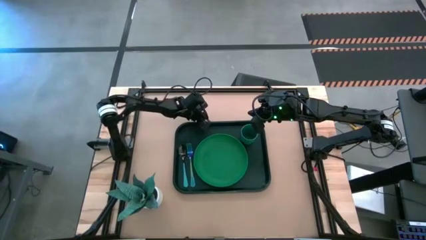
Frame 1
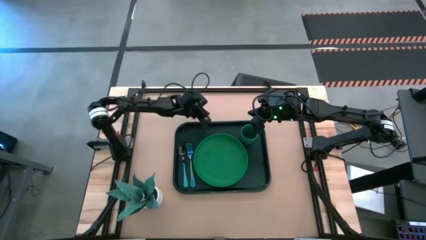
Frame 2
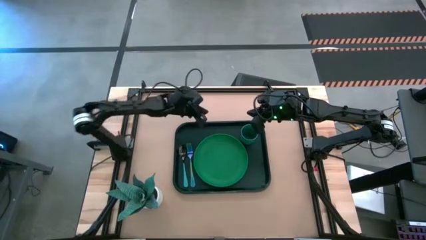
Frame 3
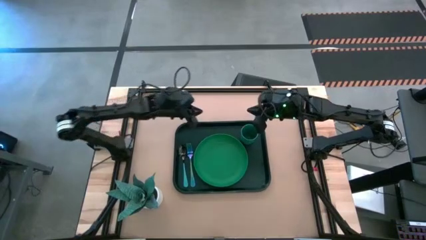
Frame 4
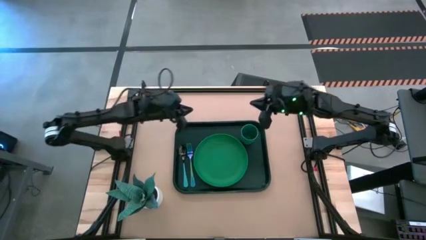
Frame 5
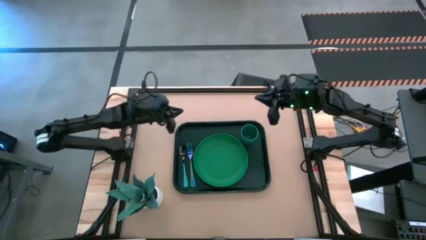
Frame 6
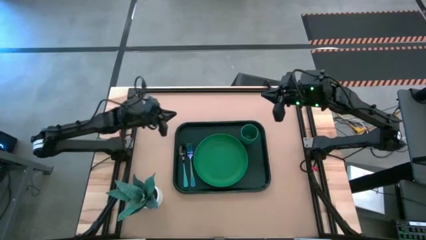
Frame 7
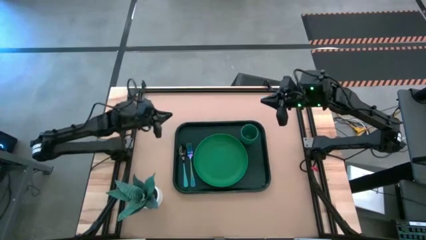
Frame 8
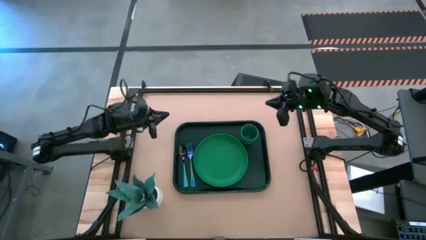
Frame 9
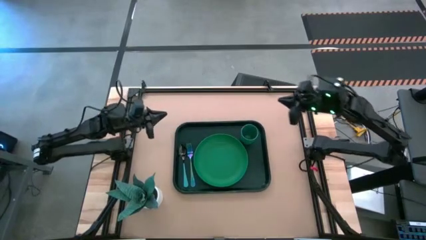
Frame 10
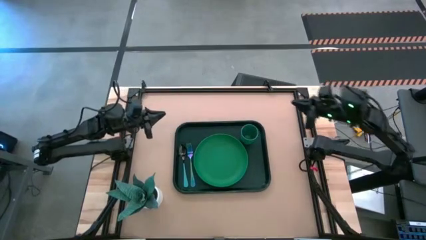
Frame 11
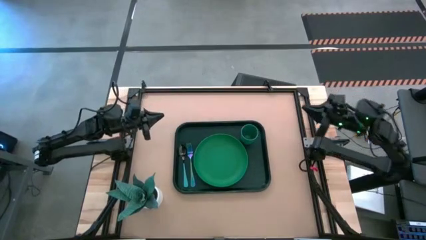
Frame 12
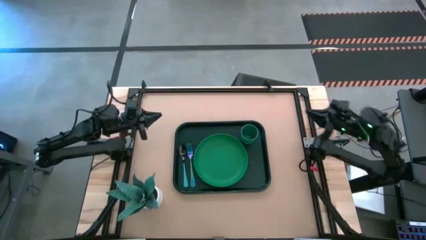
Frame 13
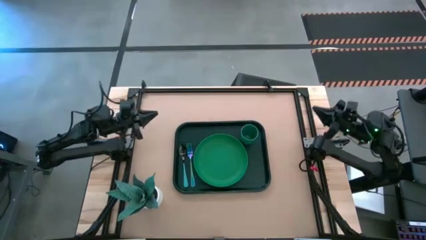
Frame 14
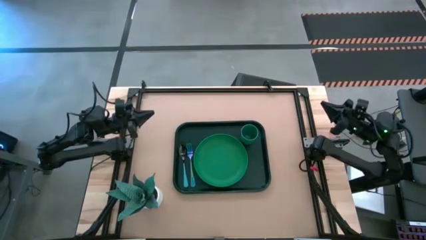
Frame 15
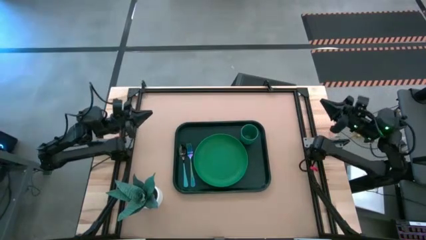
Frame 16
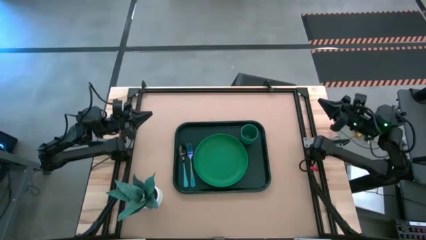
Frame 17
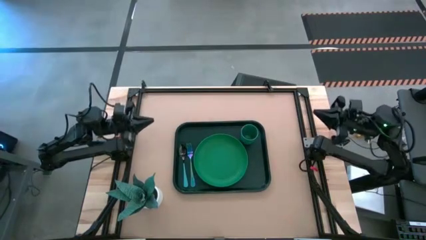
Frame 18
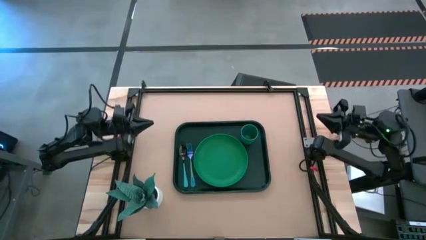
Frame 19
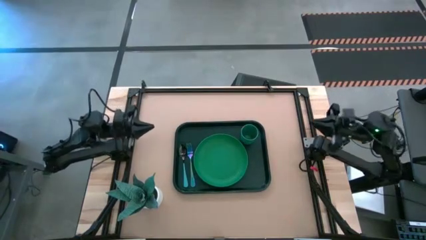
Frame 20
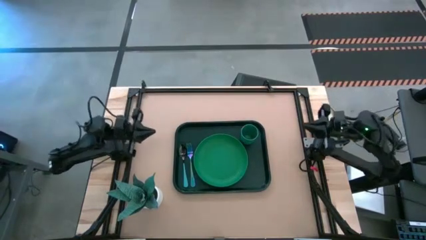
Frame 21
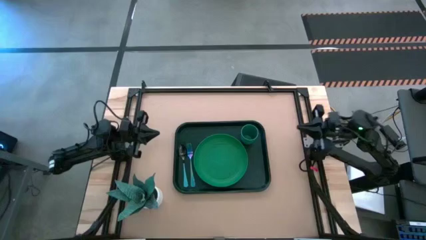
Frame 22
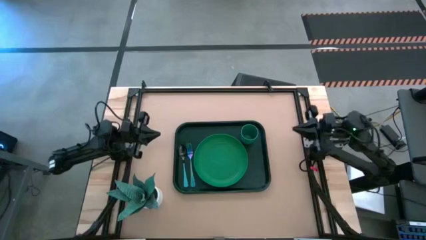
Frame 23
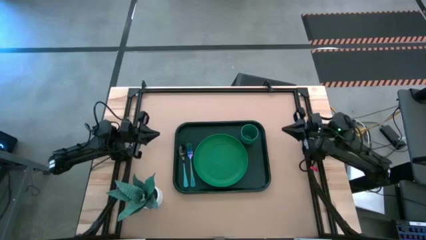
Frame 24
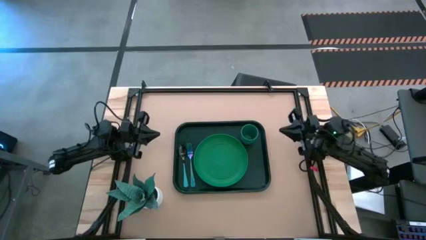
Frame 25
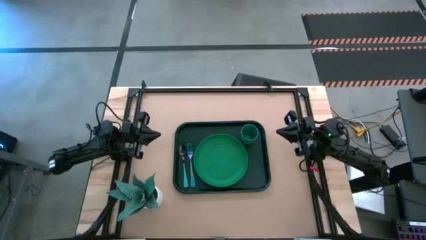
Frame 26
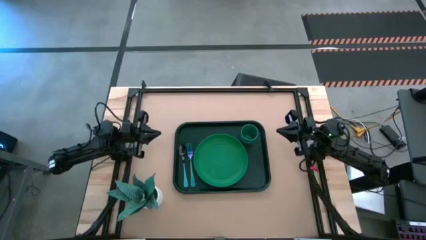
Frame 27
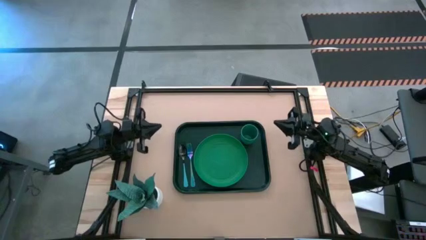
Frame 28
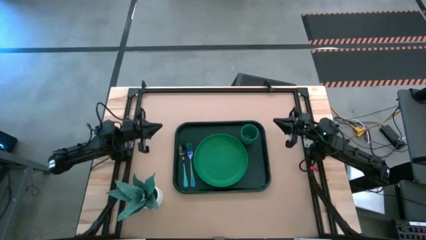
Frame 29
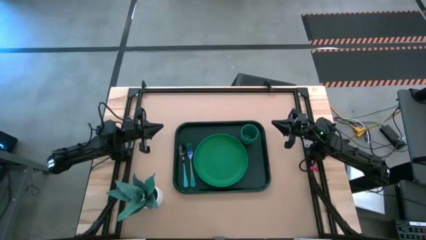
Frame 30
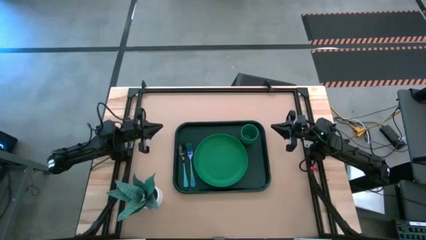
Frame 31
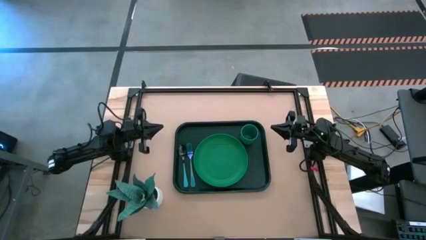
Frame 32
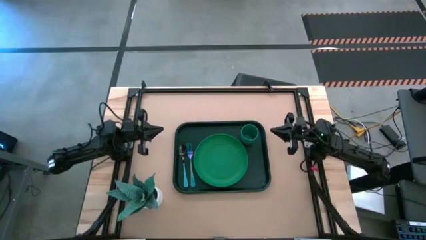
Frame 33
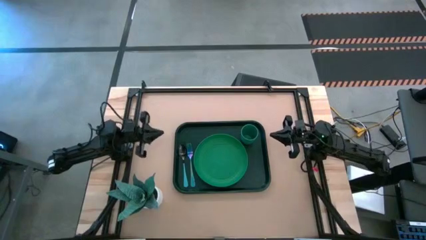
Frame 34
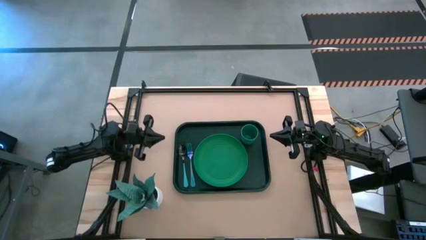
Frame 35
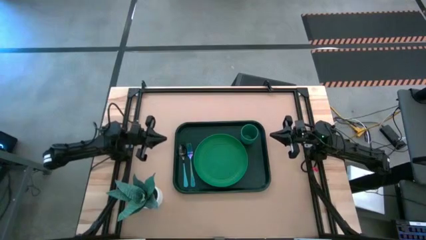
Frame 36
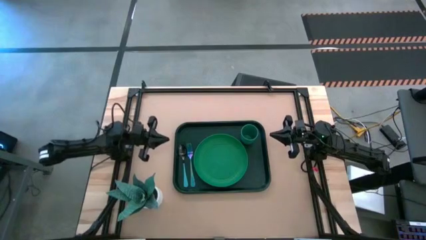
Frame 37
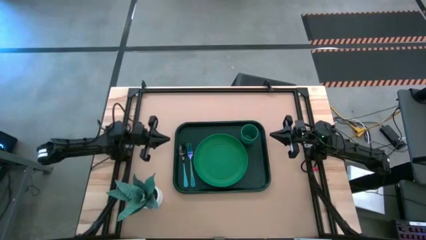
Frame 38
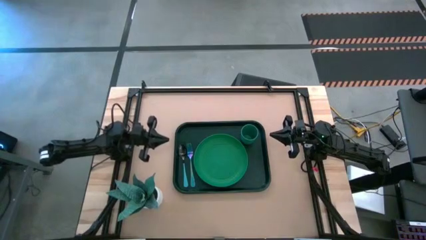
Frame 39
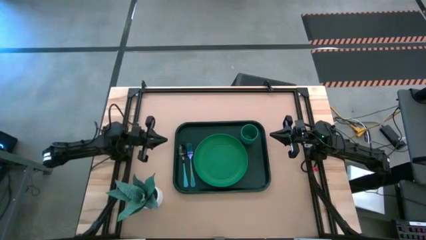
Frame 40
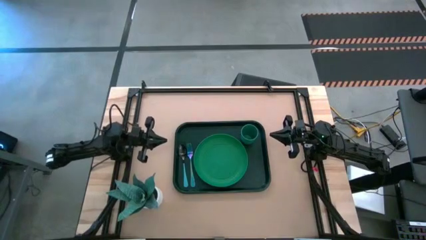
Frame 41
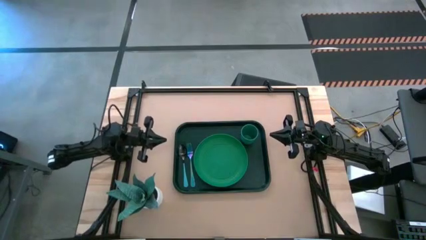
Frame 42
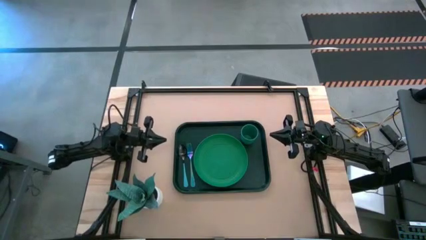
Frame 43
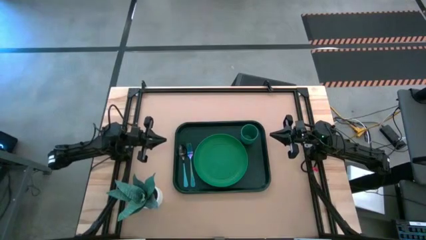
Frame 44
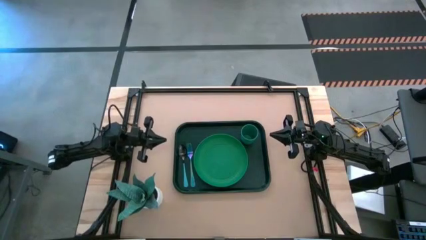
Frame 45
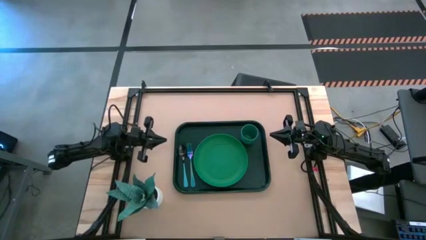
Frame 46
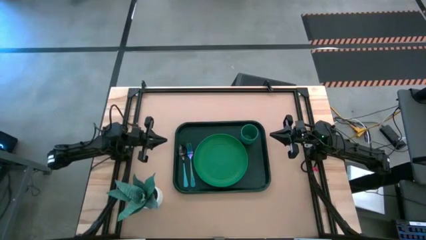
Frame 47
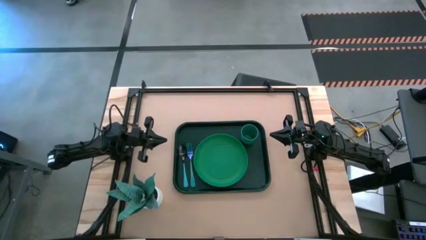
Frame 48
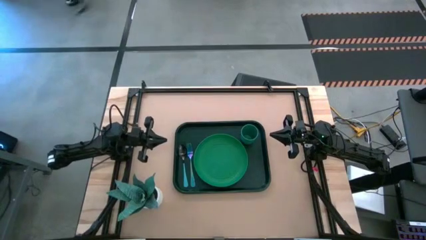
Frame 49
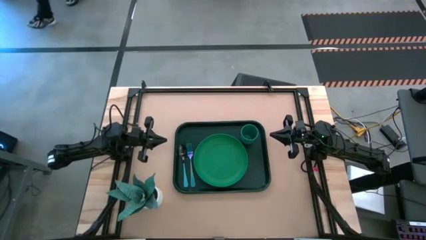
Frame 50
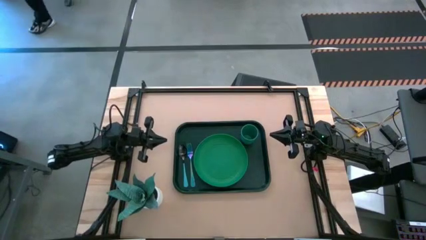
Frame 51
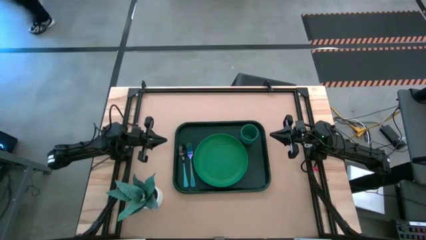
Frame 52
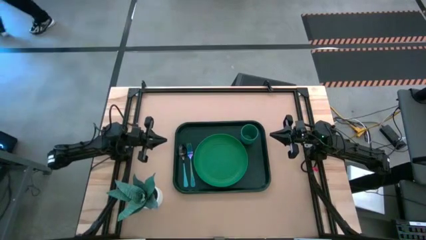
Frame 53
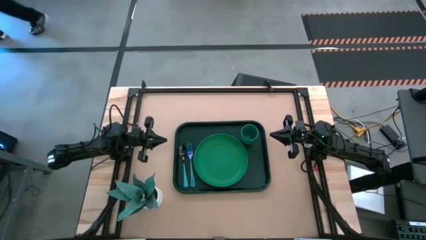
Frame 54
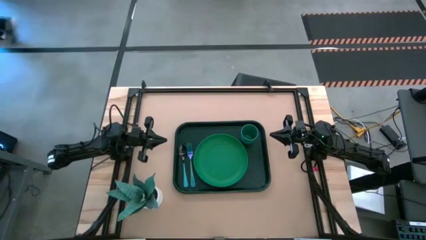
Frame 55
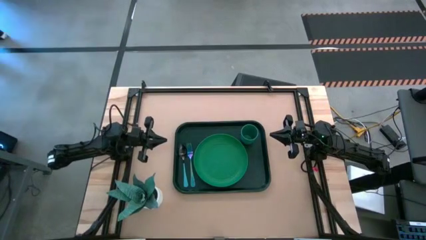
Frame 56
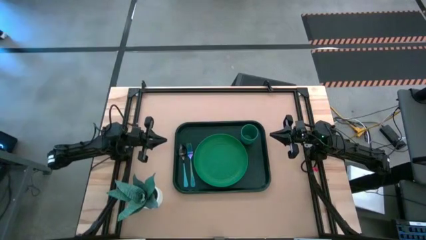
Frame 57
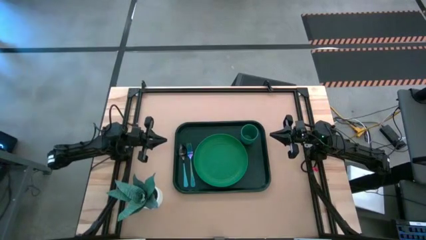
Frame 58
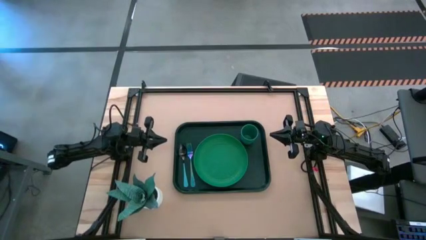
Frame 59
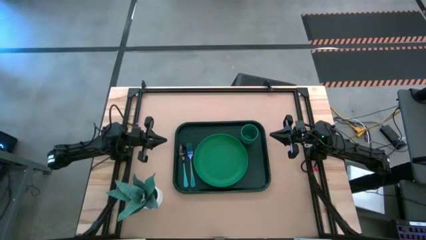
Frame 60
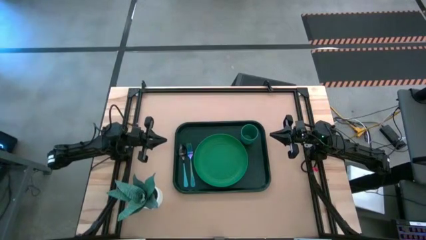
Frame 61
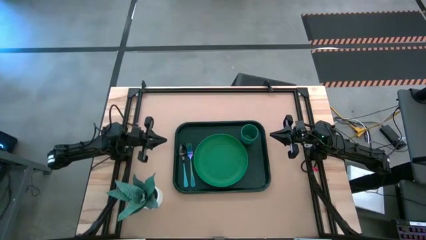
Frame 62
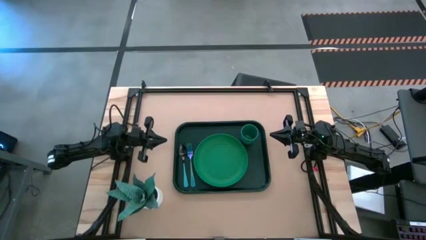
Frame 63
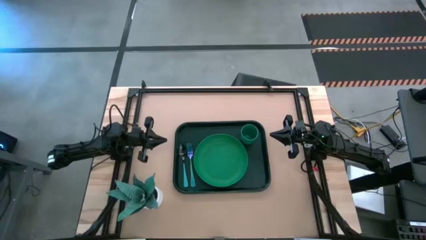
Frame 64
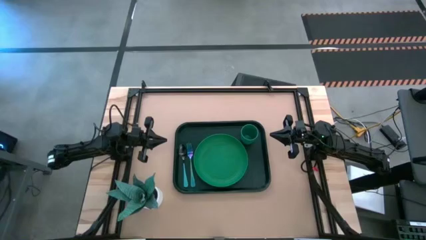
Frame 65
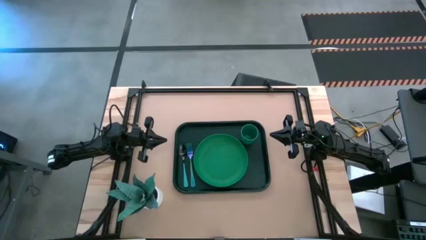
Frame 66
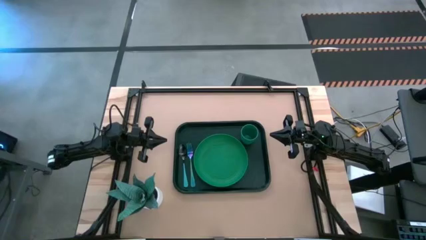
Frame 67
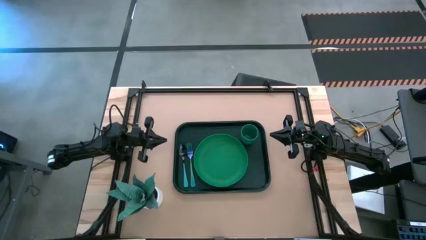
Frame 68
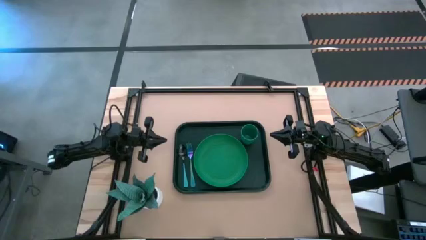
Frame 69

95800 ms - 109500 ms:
Task: Pick and place plate/cup/fork/spoon on tray
Return to Home Position

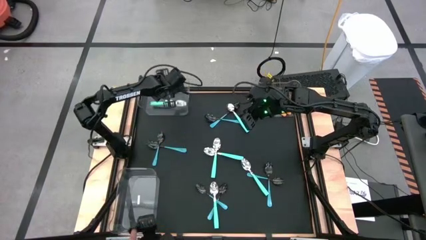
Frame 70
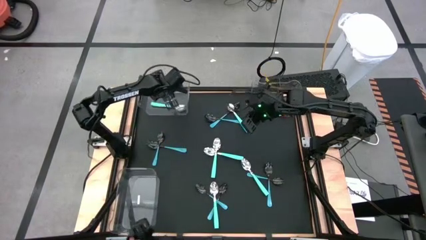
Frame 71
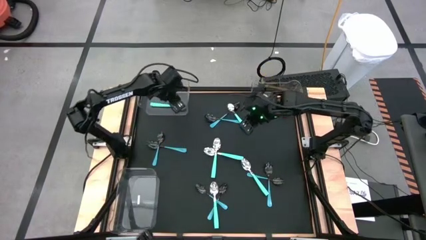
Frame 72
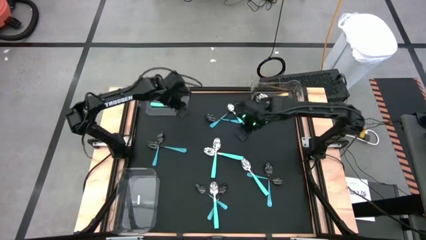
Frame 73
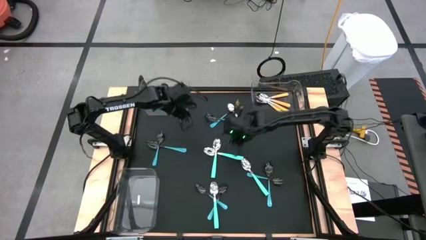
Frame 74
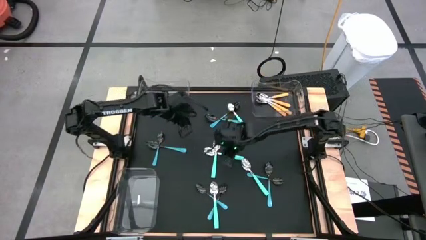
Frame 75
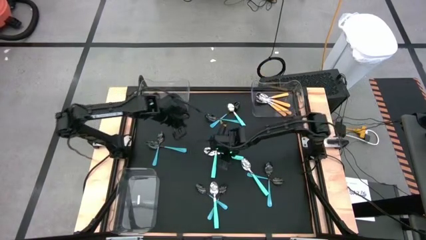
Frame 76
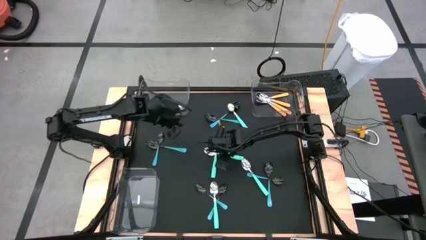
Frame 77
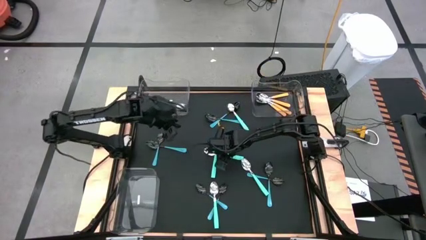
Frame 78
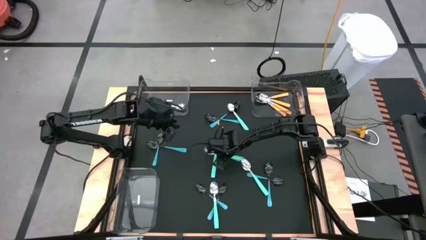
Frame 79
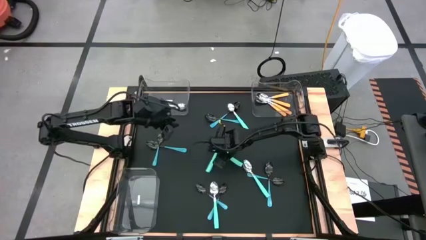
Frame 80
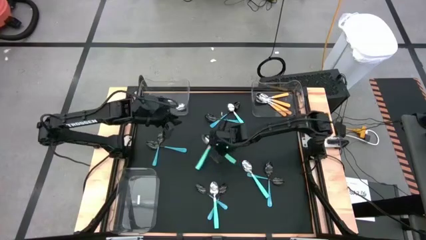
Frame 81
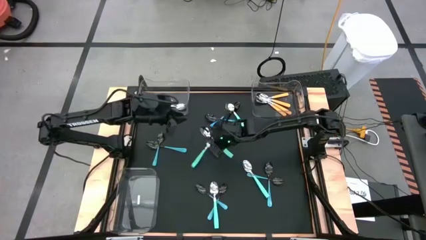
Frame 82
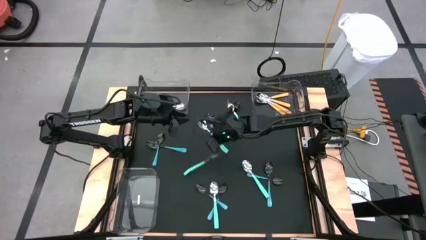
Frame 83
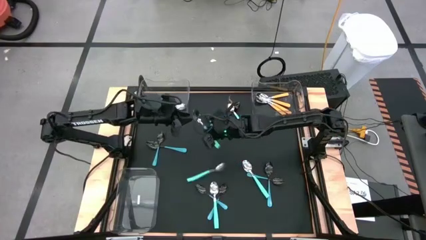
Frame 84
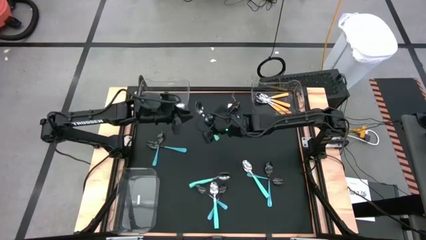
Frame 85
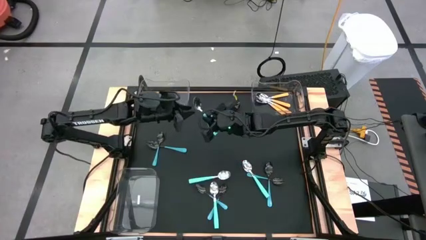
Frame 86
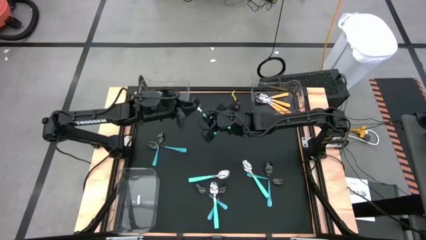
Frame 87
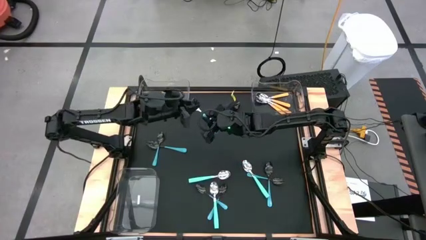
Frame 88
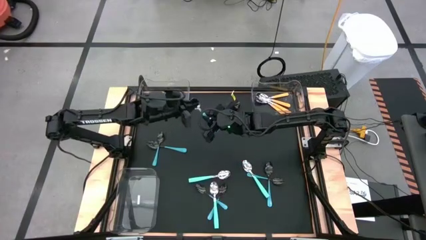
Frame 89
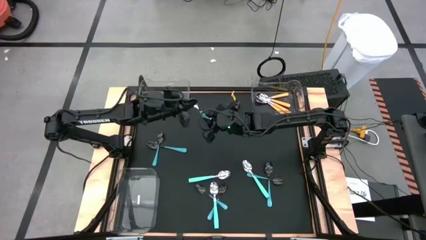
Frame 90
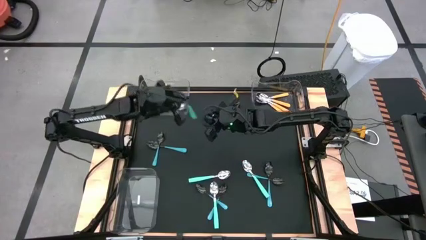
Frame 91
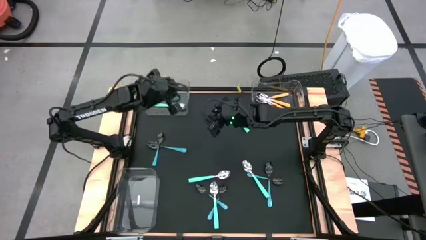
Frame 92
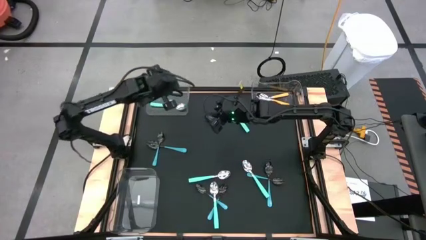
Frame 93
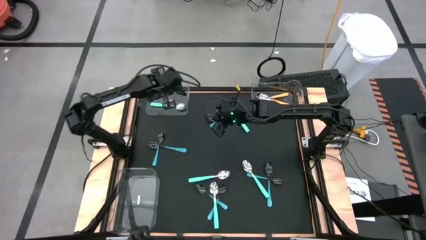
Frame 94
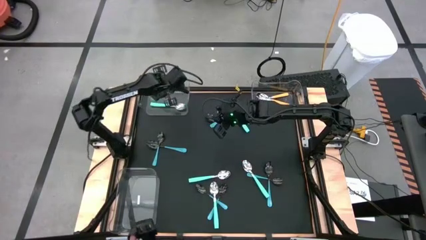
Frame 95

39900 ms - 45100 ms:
Task: Sort silverware by color (type)
Put the light blue spoon into the top left transparent bin
